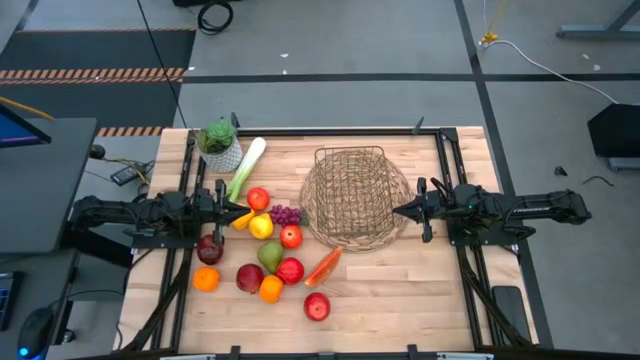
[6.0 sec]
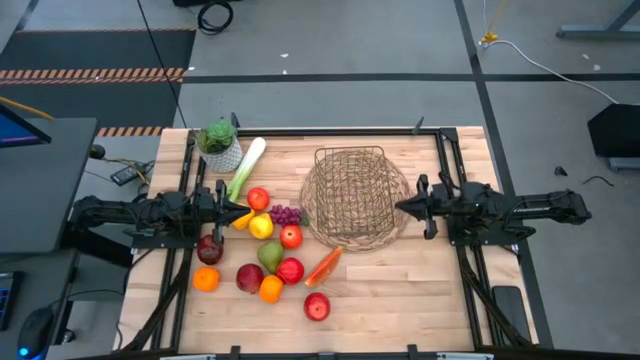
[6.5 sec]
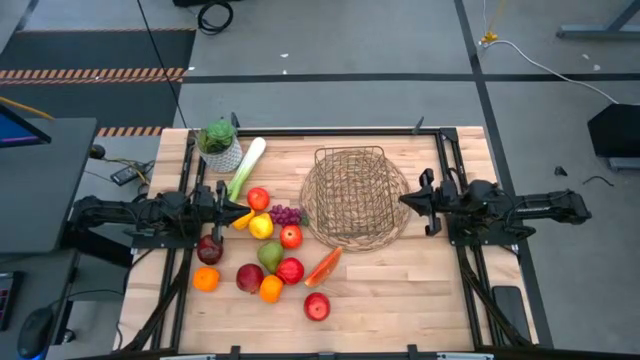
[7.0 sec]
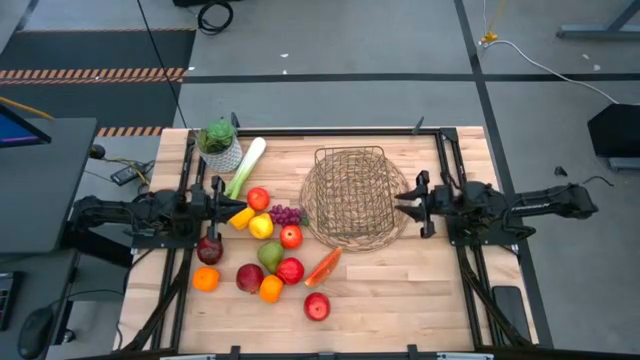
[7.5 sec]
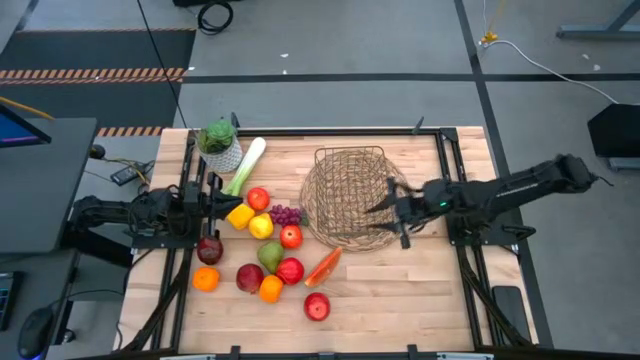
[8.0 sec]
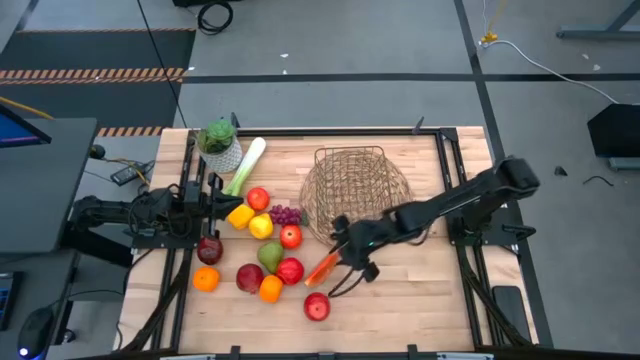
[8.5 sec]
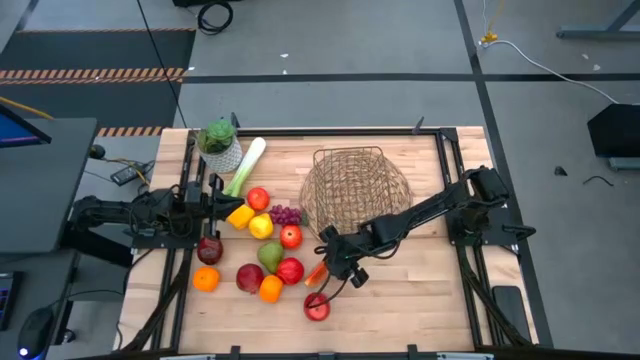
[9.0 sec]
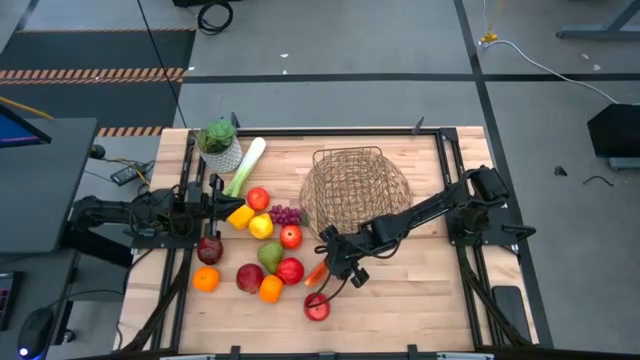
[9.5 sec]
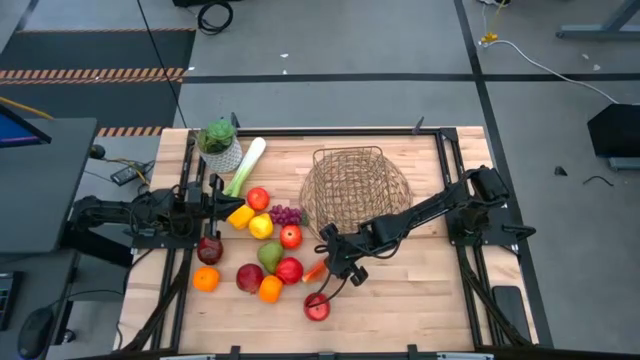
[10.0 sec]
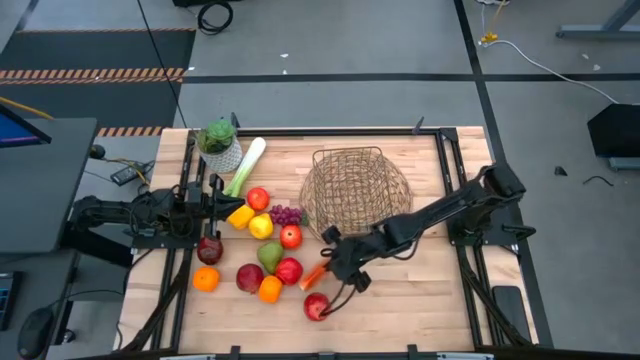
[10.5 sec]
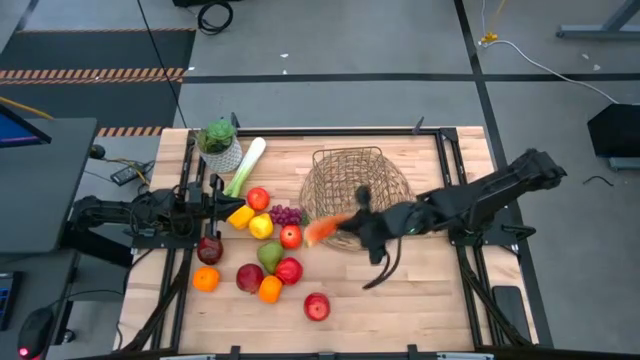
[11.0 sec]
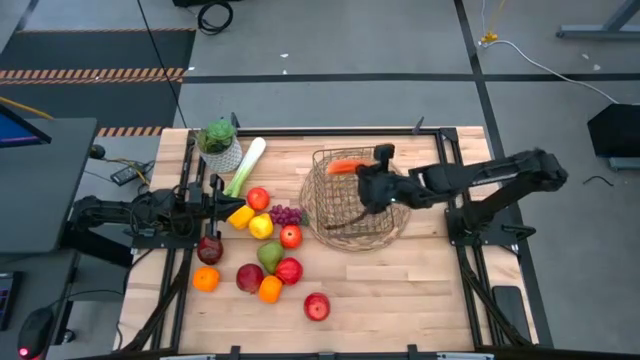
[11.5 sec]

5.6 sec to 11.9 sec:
Task: Build produce basket
Put the orange melon into the wire basket

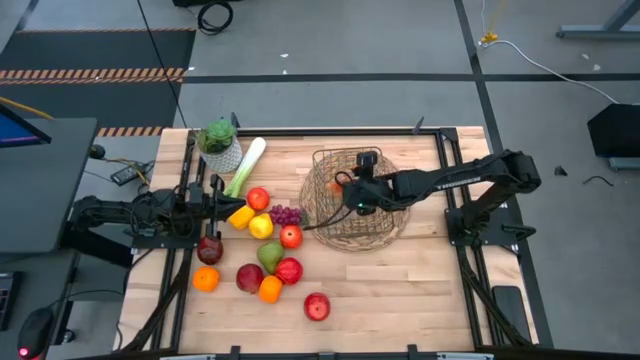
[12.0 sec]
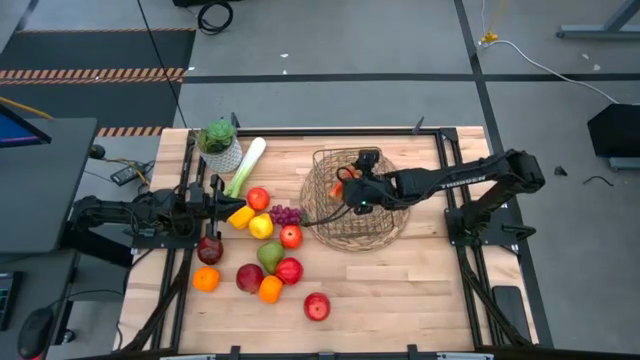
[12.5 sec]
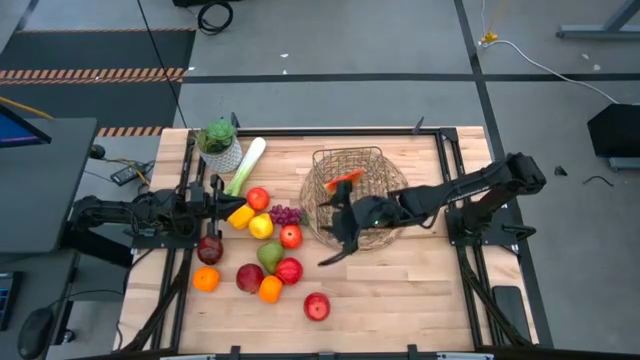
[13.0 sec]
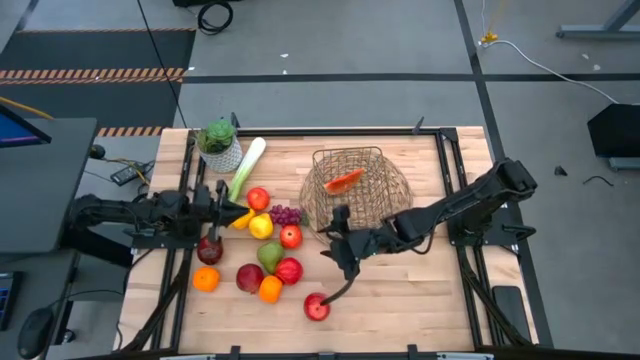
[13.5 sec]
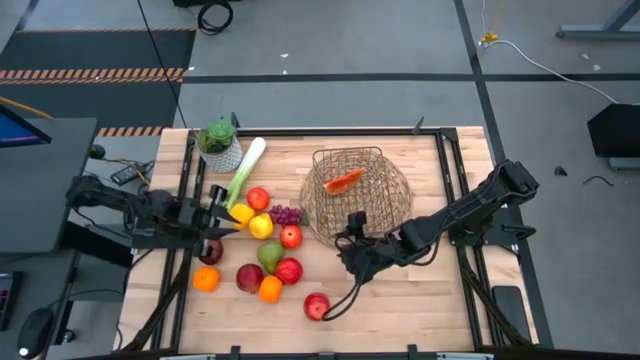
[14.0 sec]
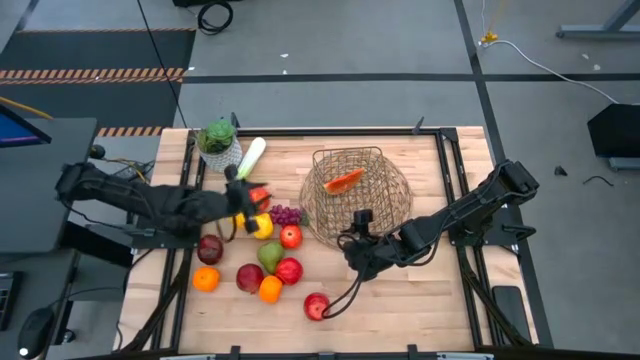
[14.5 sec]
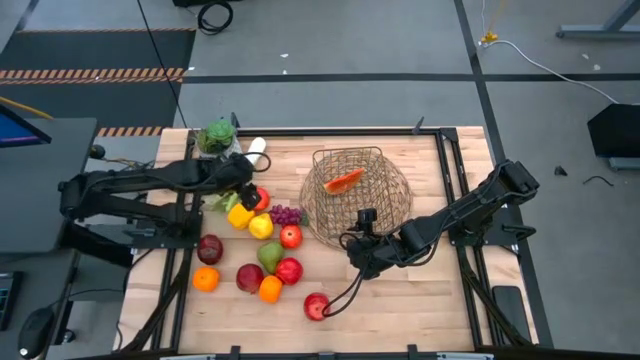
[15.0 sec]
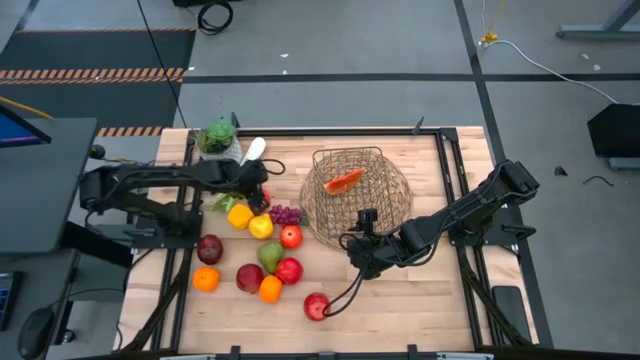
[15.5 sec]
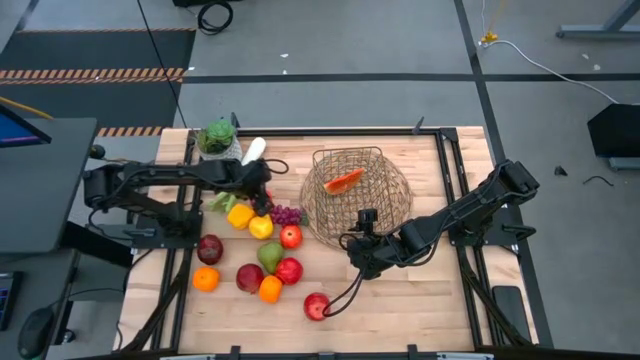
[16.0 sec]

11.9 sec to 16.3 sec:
Put the top left red apple into the wire basket

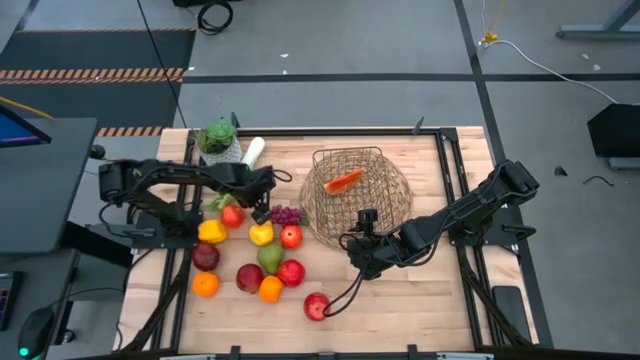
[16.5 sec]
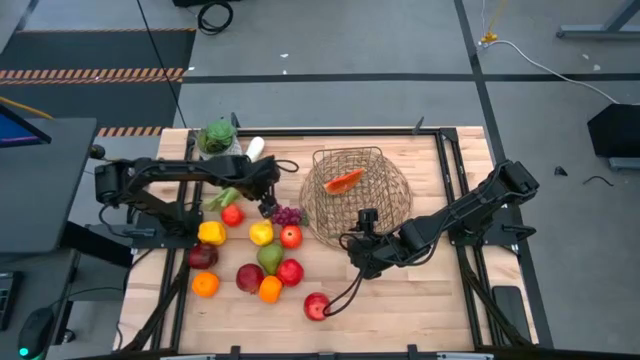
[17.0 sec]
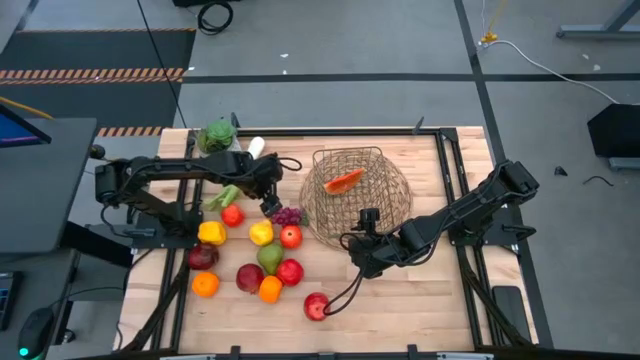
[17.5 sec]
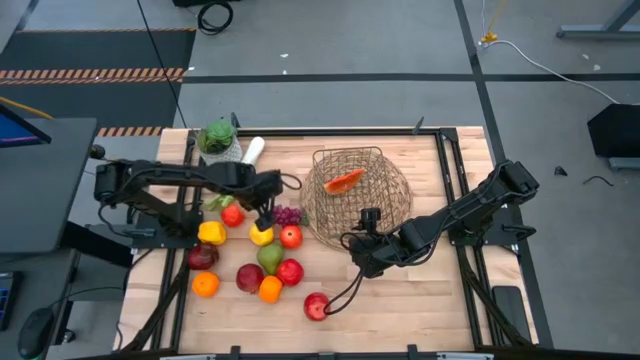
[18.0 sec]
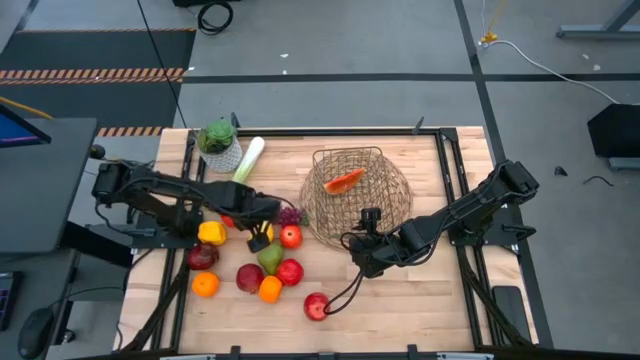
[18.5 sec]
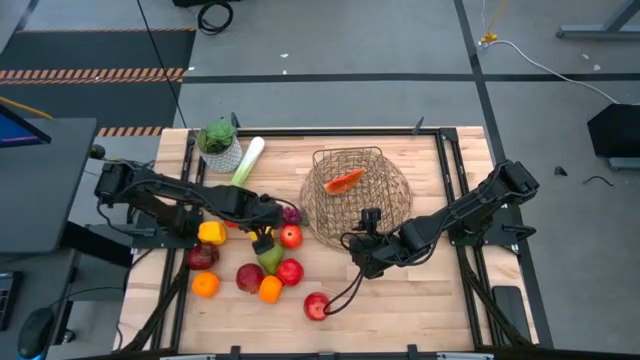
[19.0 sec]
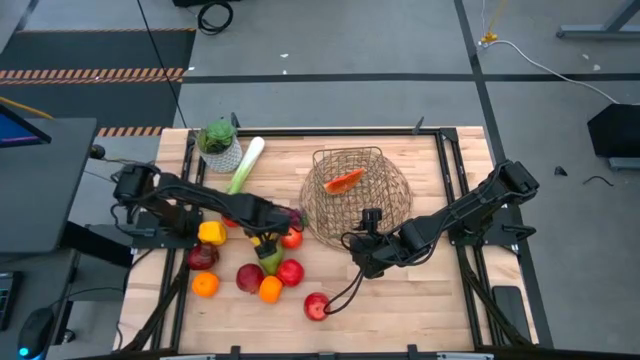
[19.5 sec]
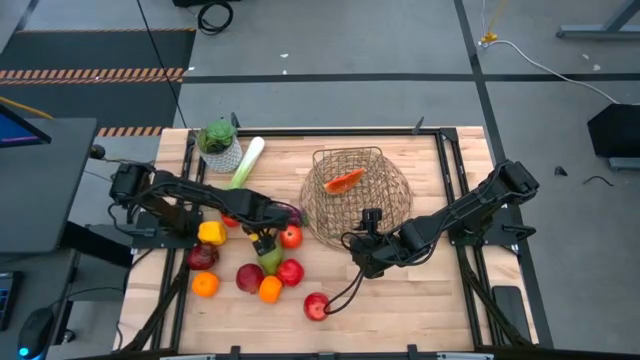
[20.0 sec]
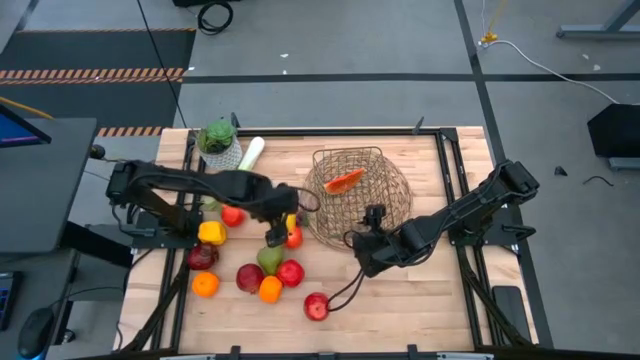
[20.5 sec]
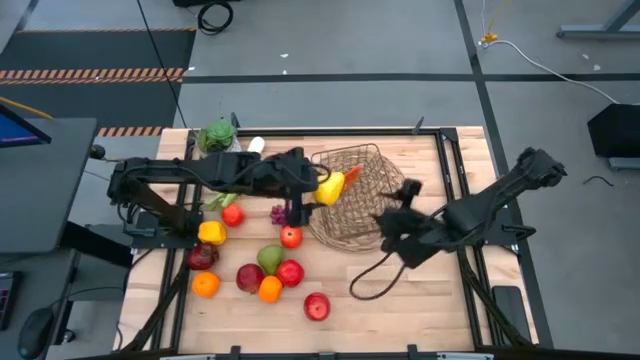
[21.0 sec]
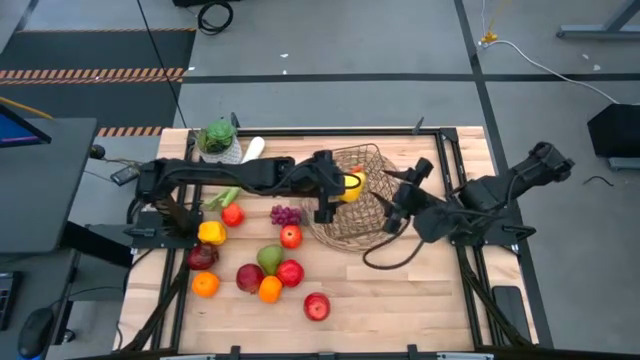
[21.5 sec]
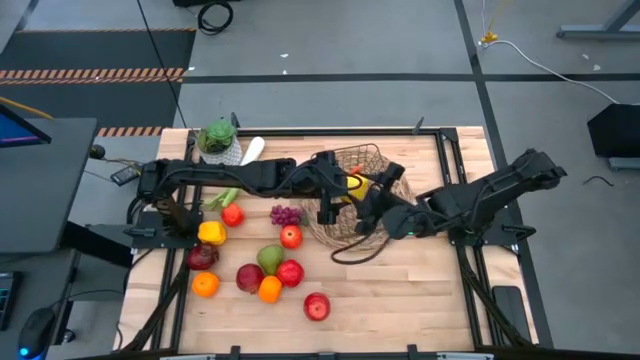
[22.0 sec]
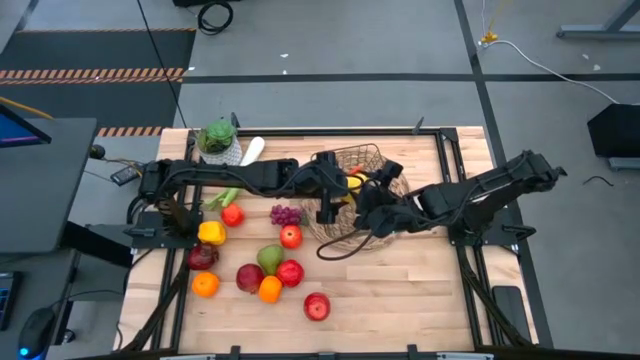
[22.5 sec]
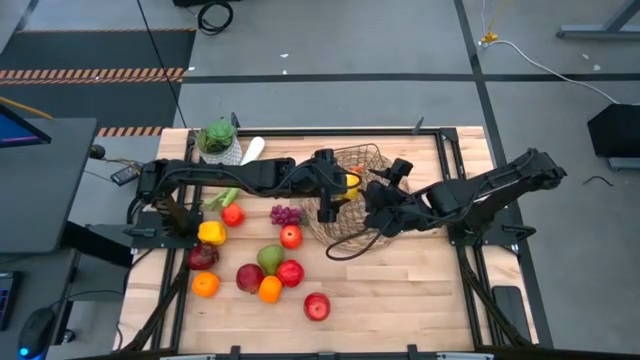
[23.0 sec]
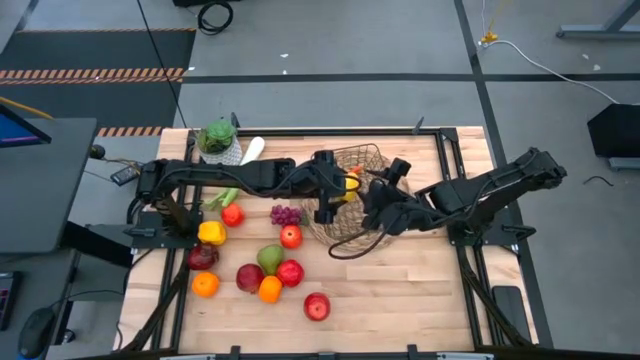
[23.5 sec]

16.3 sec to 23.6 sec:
Put the yellow pear into the wire basket

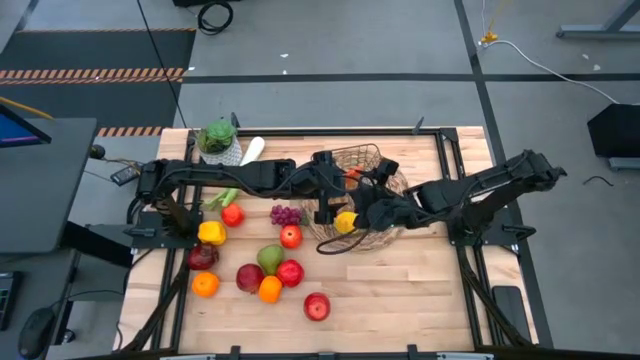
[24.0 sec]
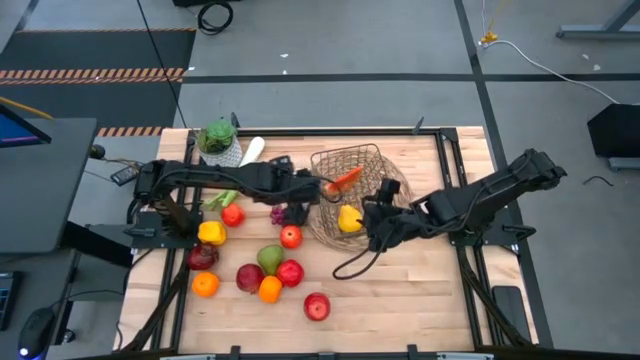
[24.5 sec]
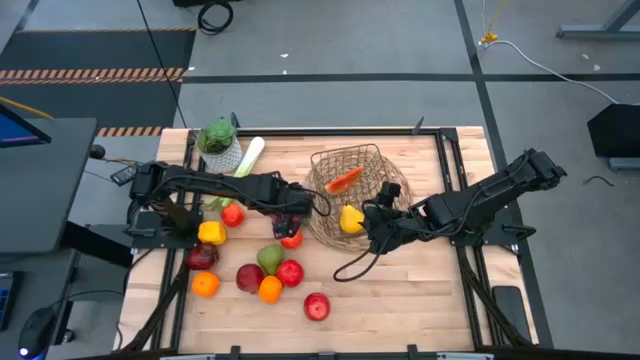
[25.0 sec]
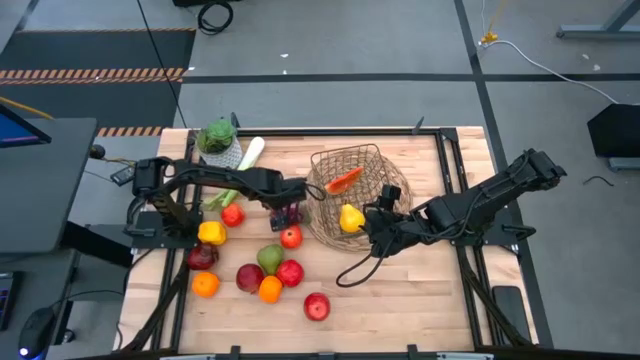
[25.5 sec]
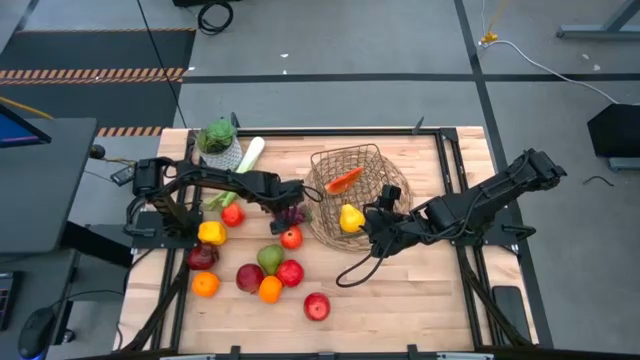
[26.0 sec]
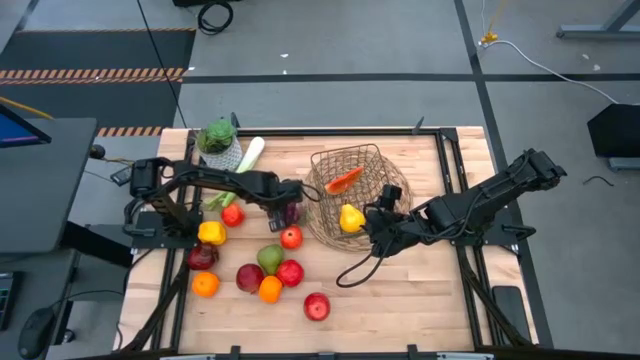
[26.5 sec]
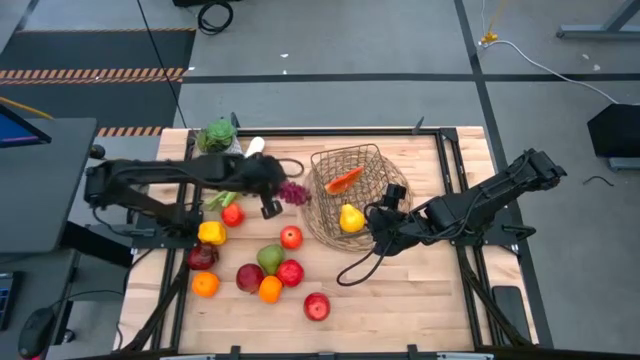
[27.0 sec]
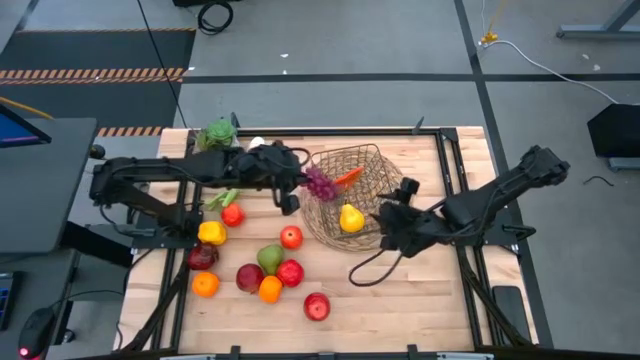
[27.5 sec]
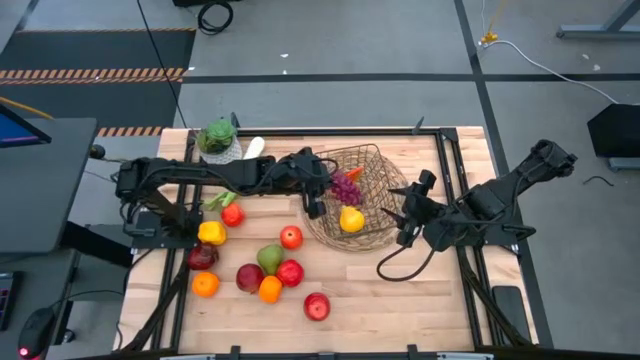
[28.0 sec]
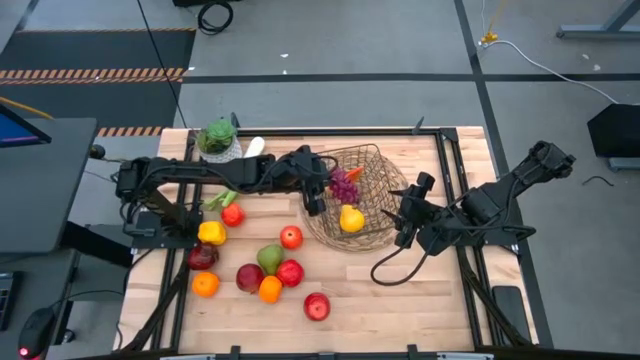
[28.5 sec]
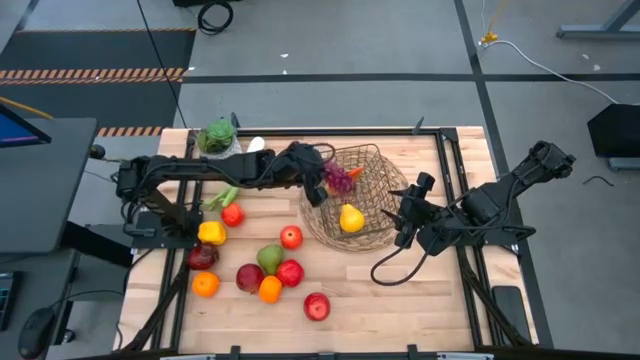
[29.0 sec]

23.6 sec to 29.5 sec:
Put the purple grapes into the wire basket
